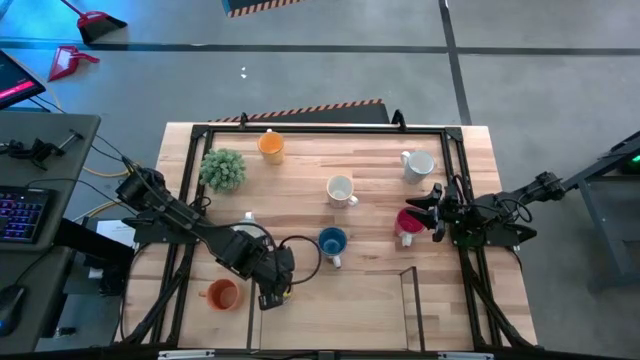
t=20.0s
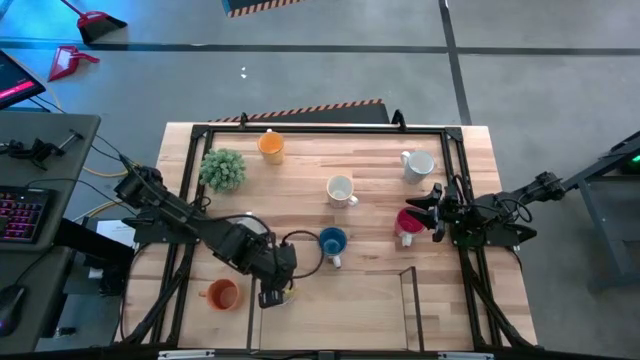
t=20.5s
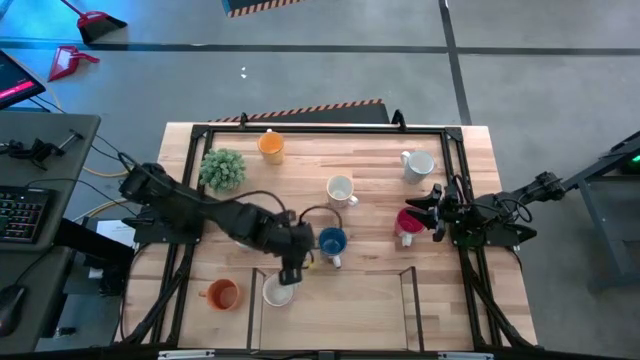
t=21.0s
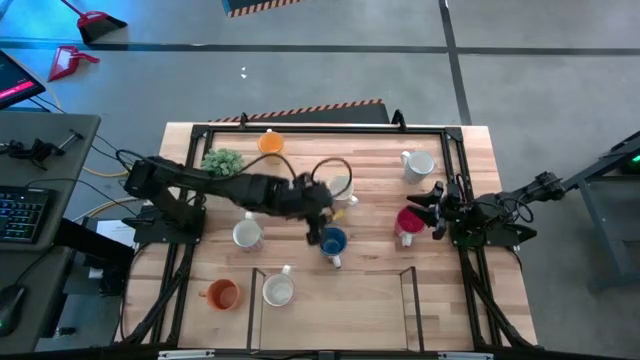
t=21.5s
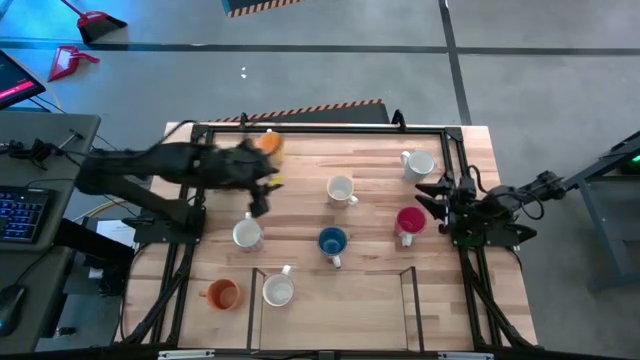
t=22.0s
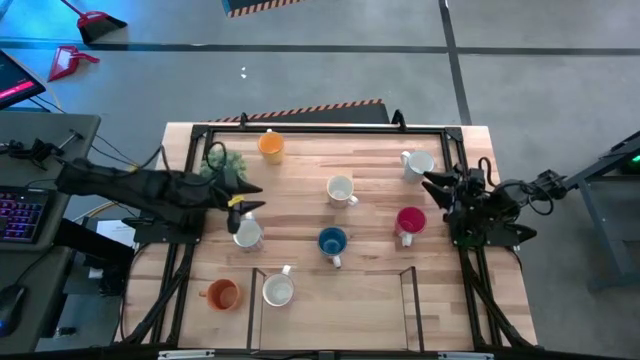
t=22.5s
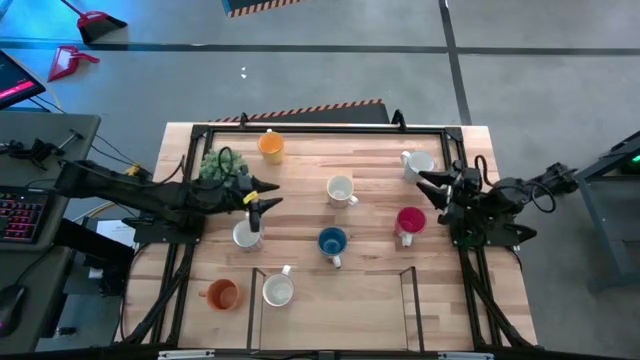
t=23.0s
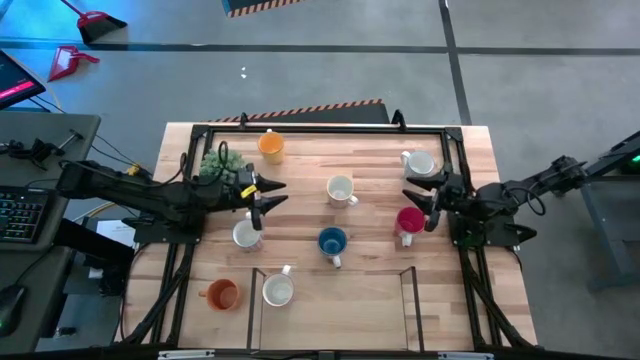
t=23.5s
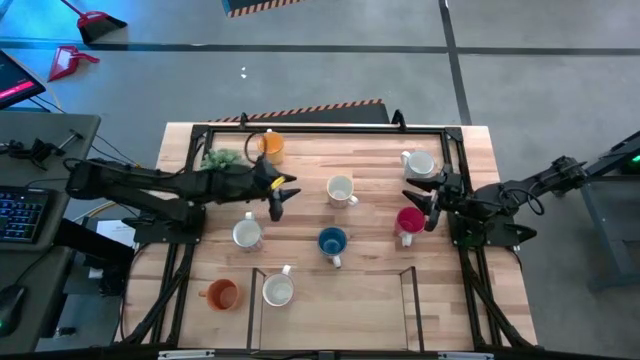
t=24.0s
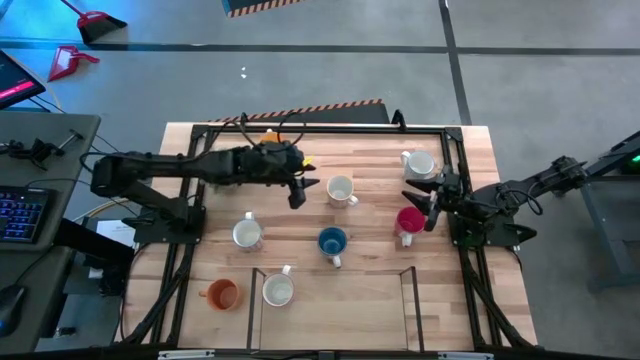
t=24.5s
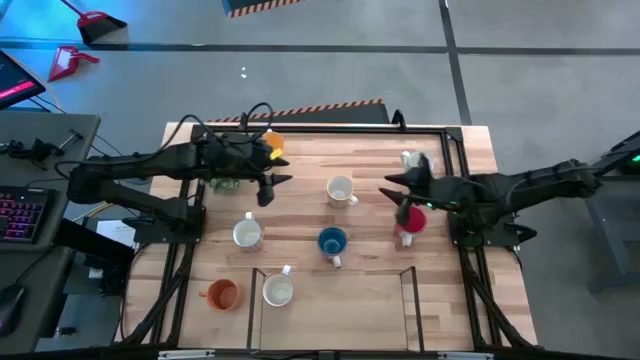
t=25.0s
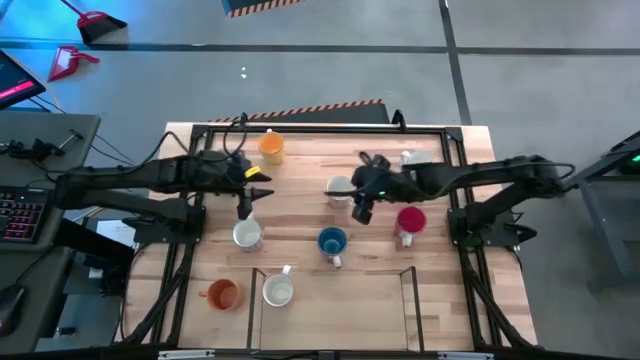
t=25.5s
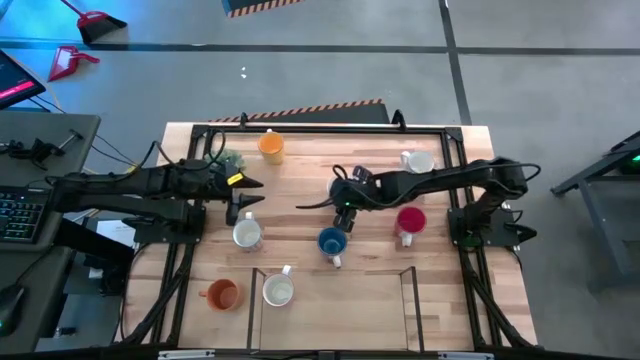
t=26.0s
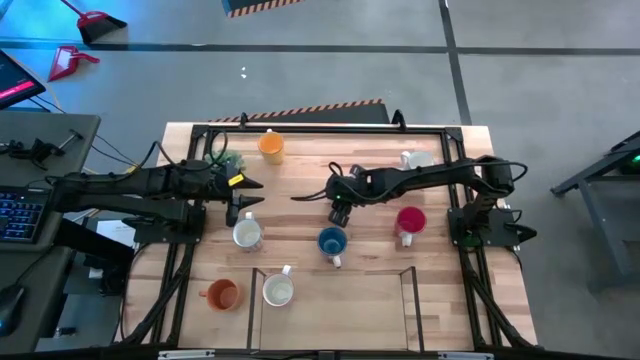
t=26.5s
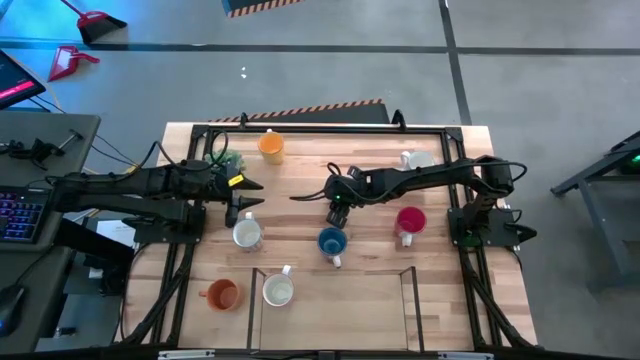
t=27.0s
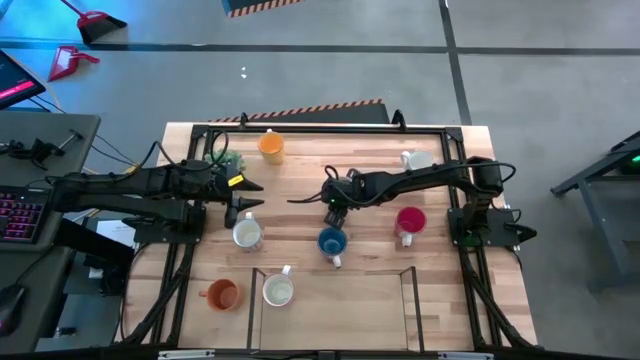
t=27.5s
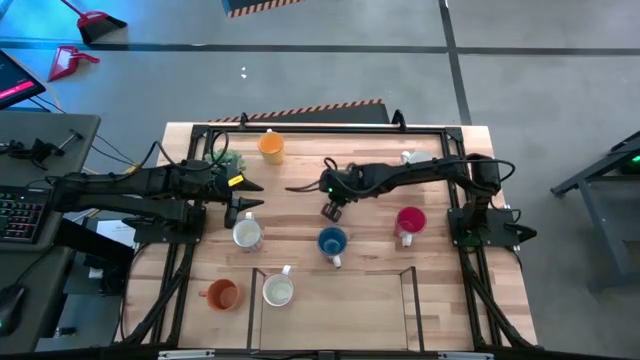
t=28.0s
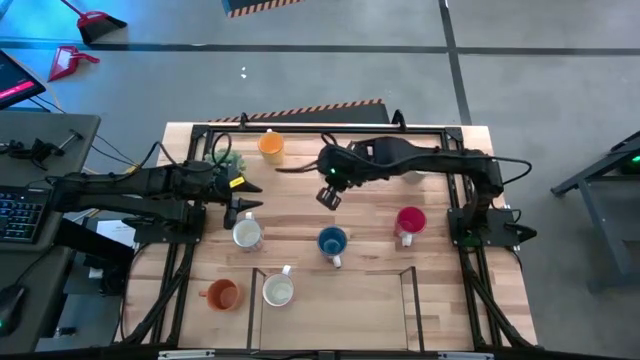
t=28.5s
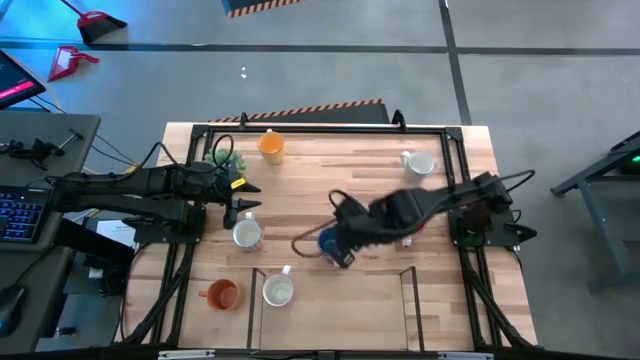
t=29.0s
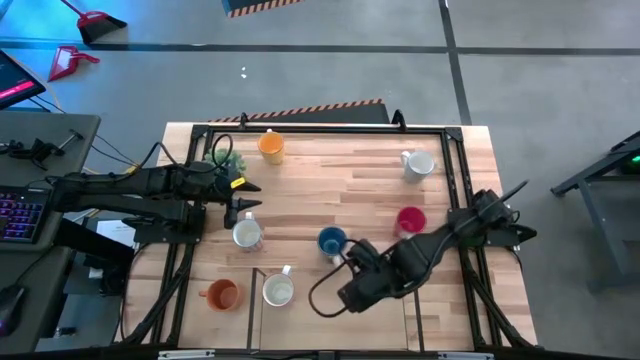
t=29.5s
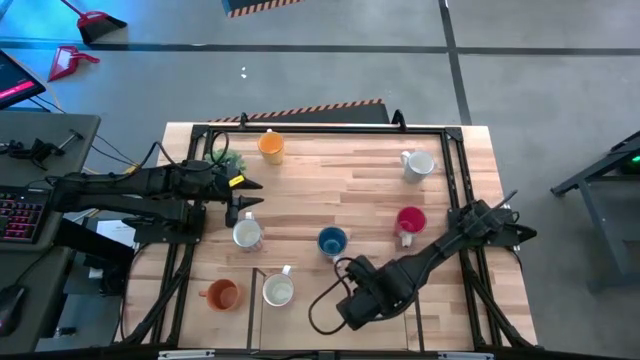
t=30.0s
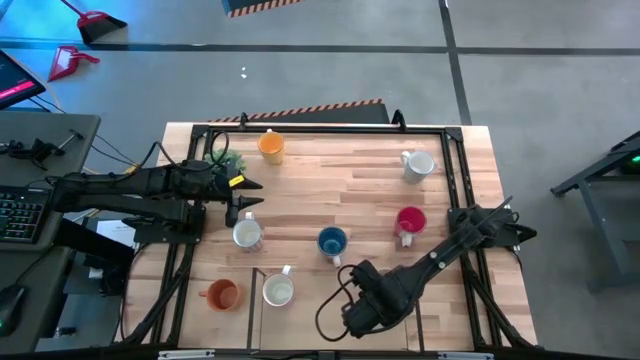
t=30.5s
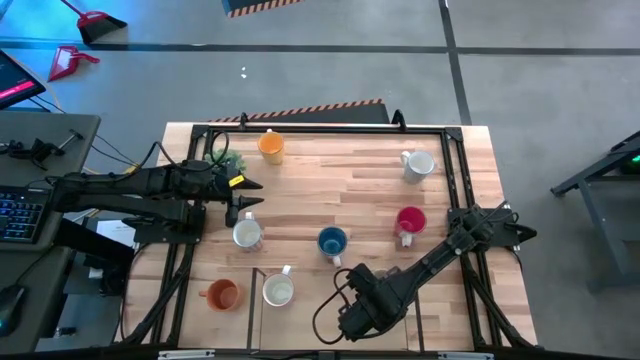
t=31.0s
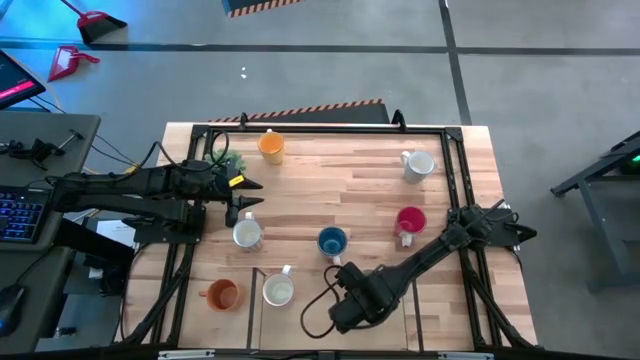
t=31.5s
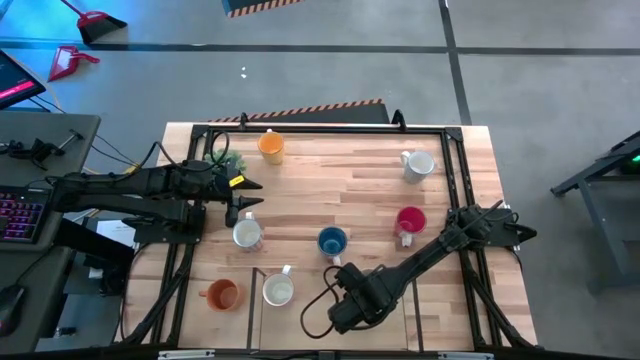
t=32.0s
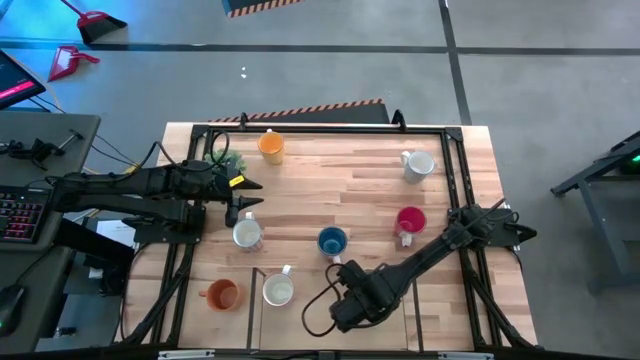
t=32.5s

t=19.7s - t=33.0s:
Task: Place coffee mugs
Put the orange pattern mug on the the shelf

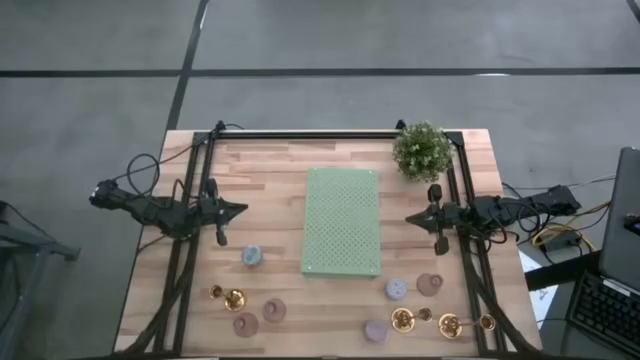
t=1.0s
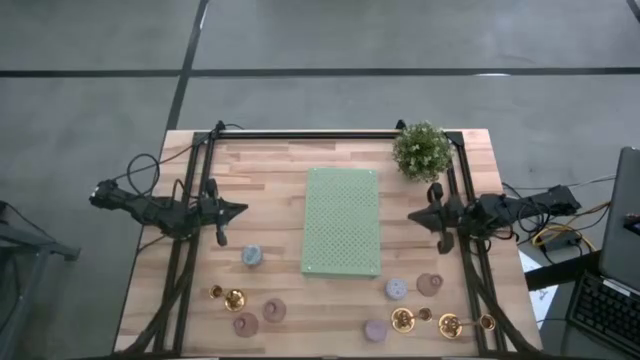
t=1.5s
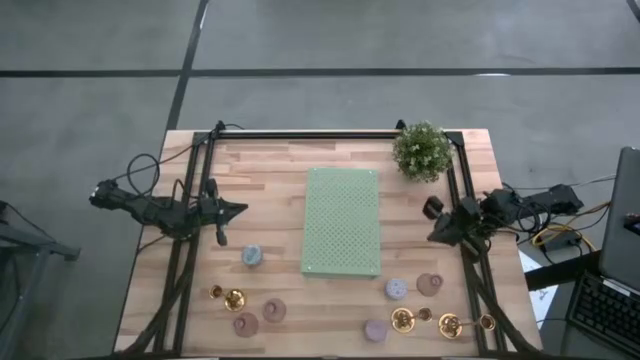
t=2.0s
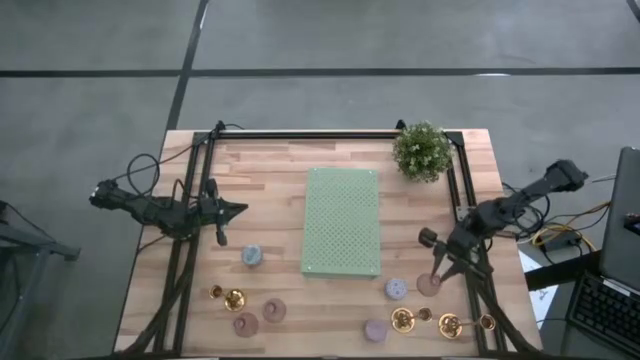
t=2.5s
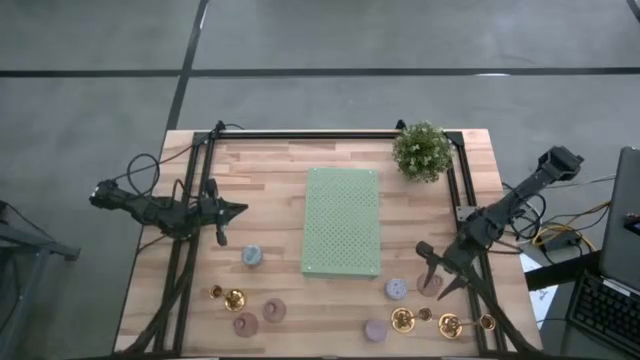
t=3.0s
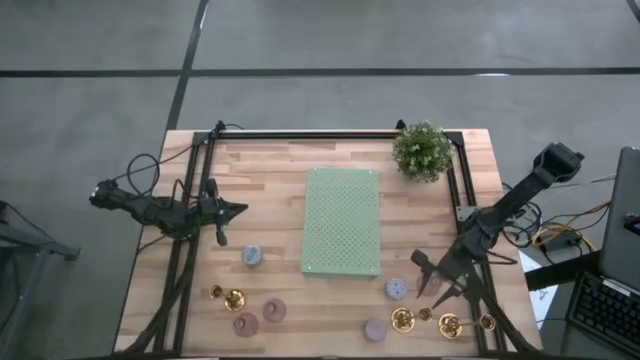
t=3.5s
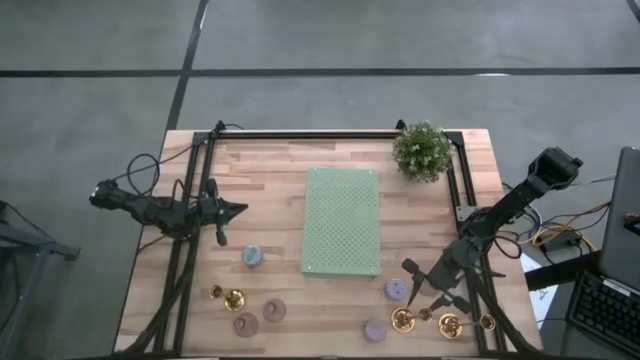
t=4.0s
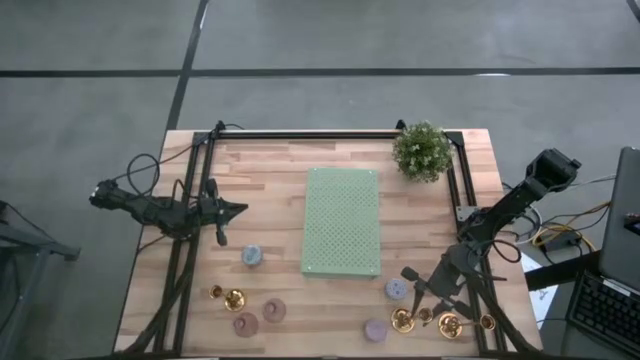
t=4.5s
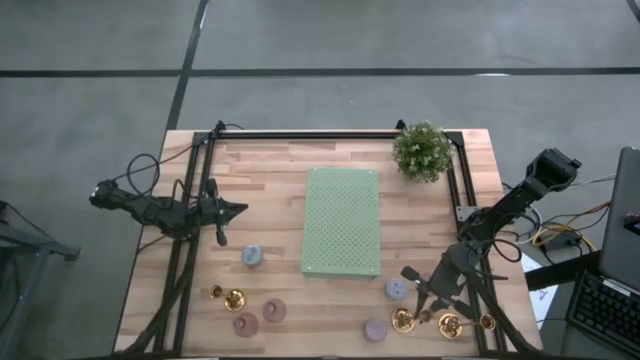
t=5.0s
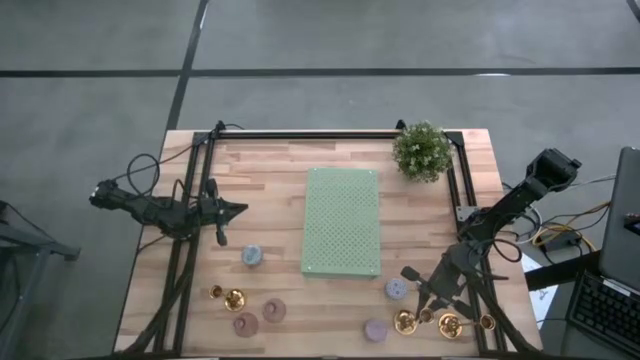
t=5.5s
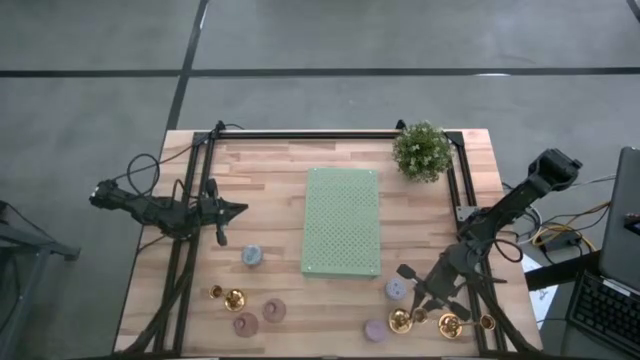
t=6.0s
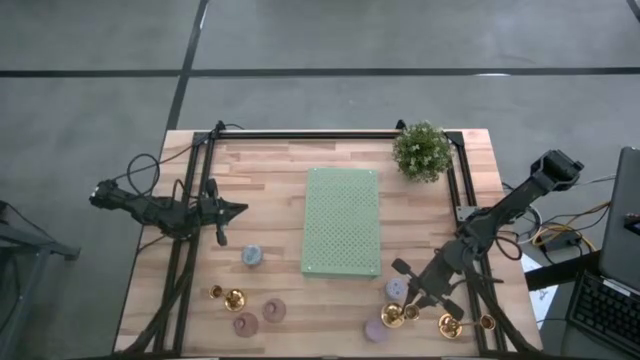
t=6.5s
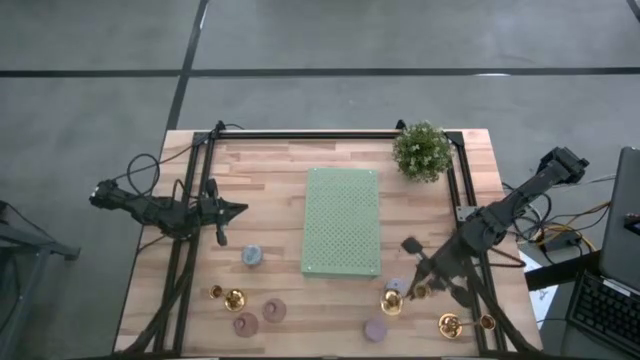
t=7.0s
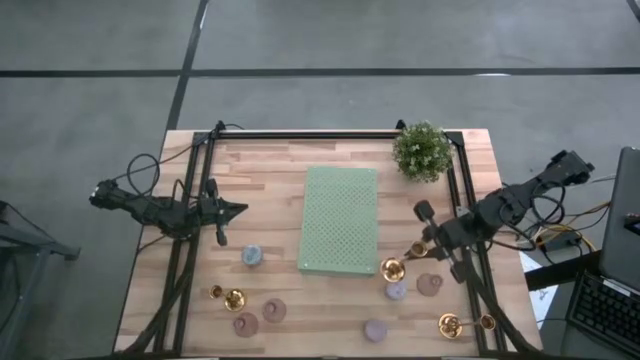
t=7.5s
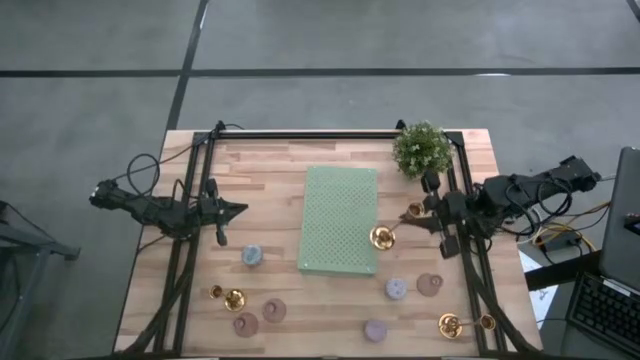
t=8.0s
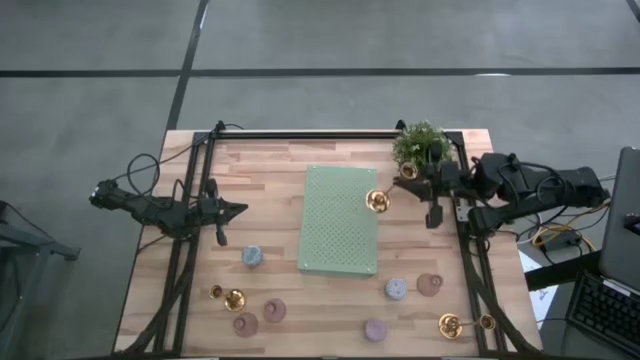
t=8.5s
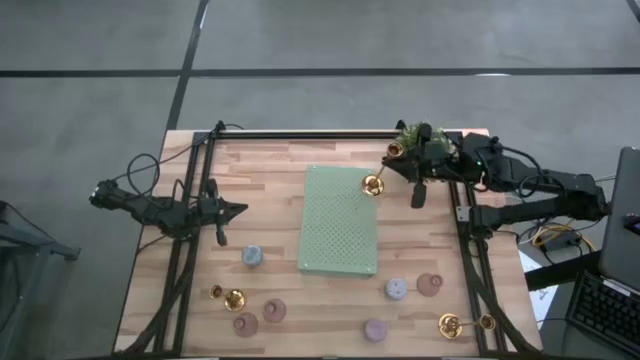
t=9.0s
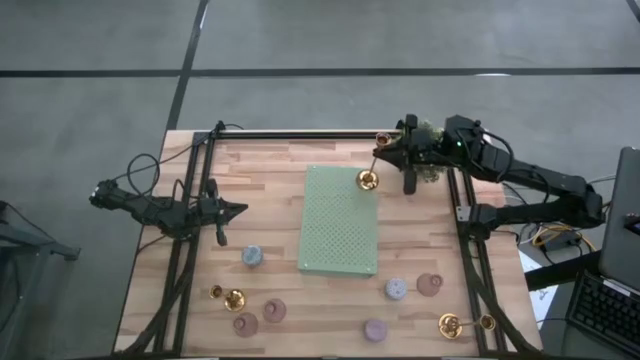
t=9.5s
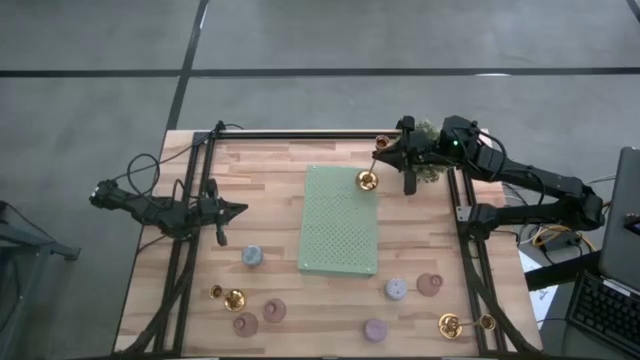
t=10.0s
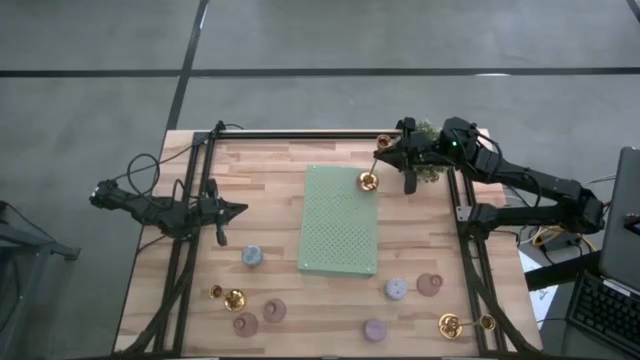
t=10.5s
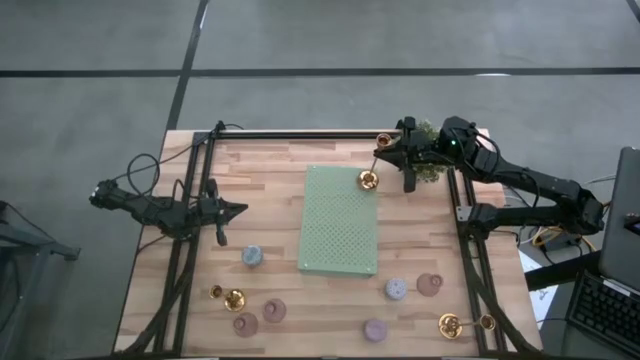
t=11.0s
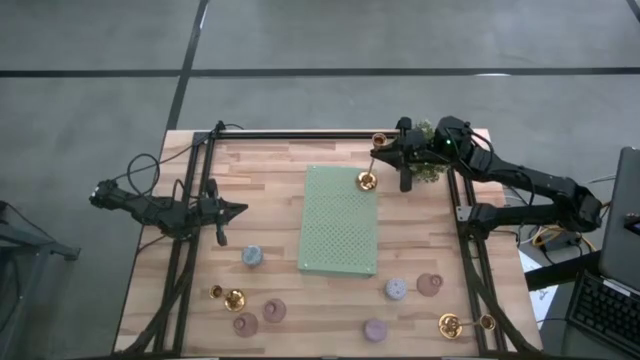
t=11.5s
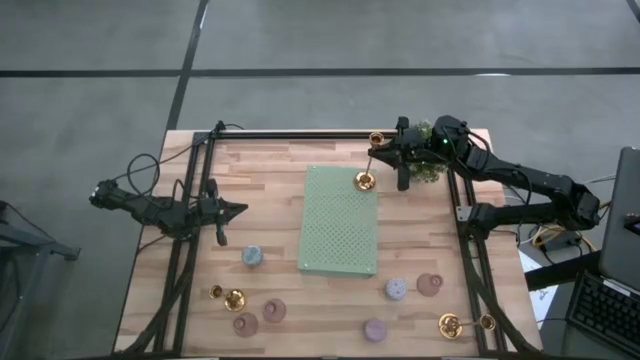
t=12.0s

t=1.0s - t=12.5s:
Task: Pick & Place candle stick holders
Put the middle gold candle holder on the shelf
